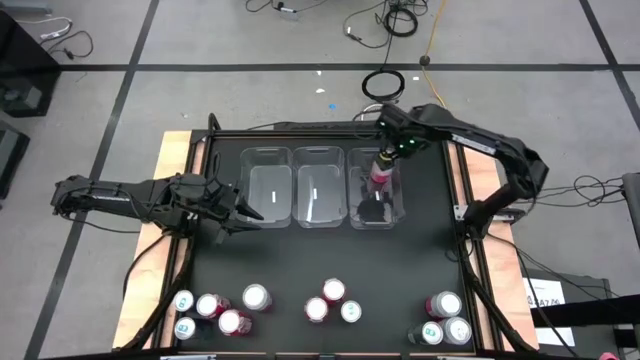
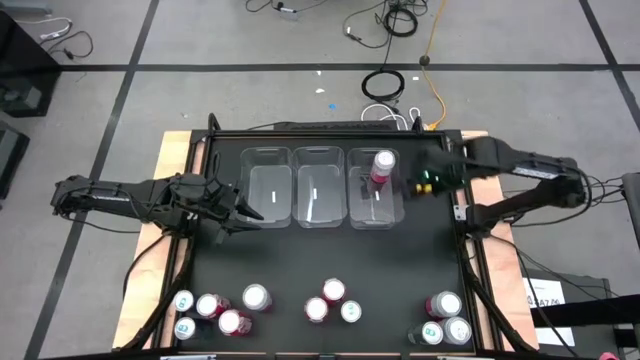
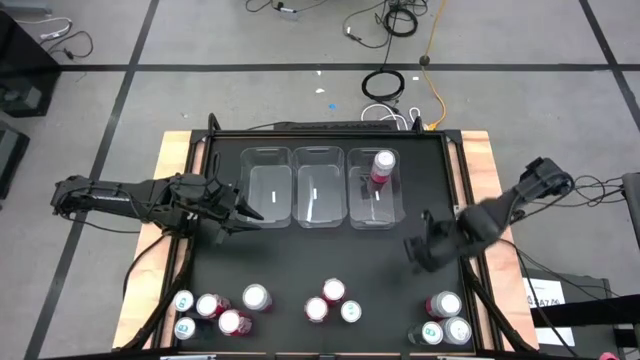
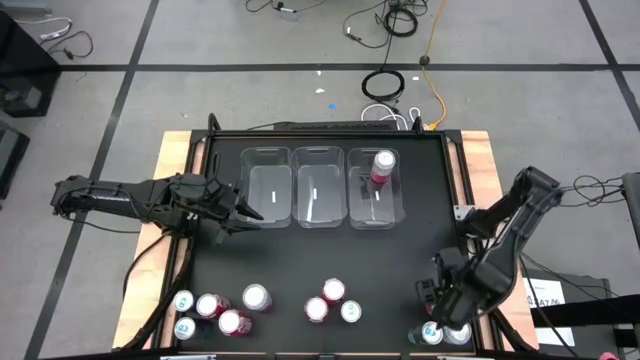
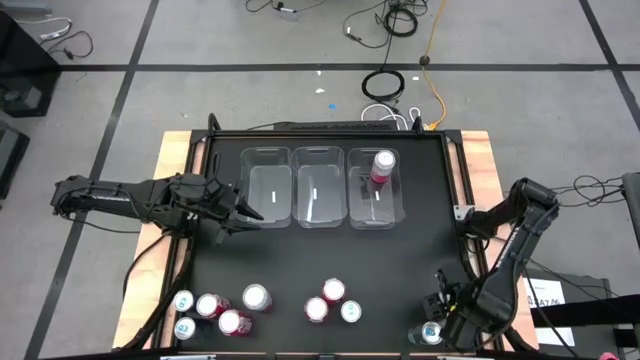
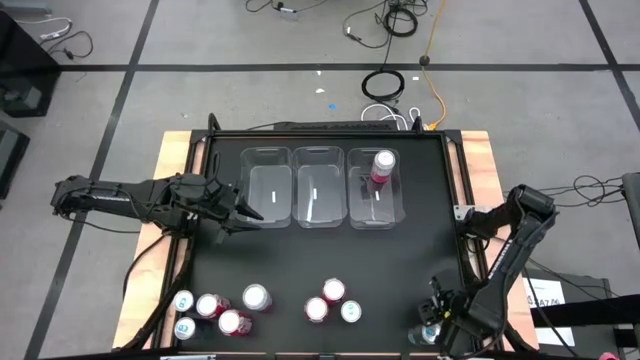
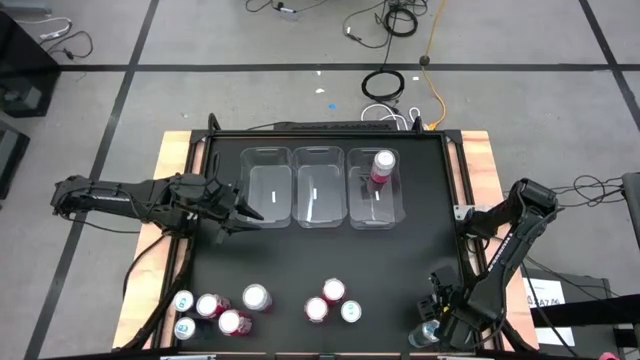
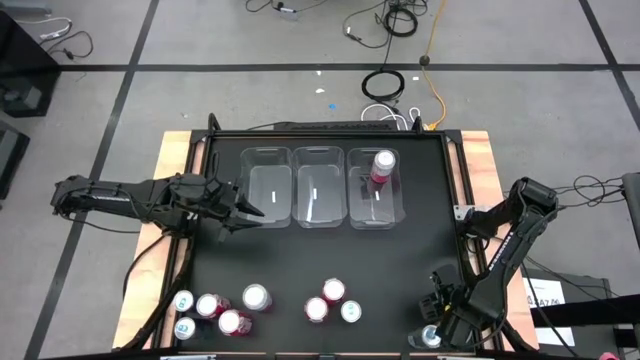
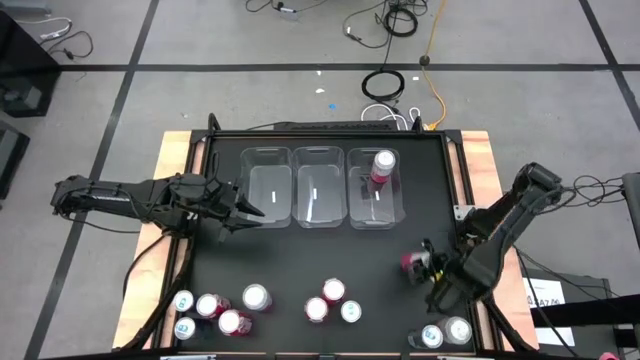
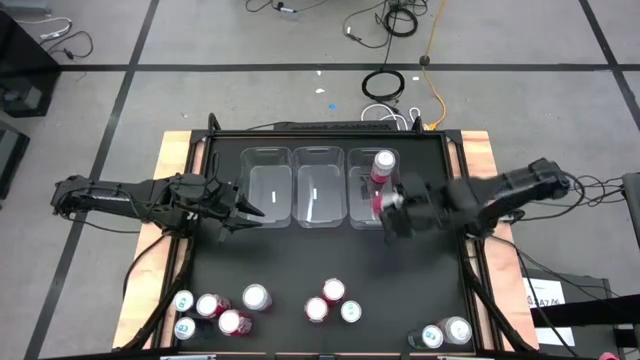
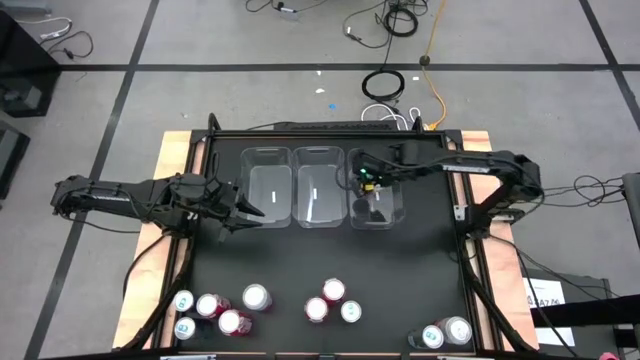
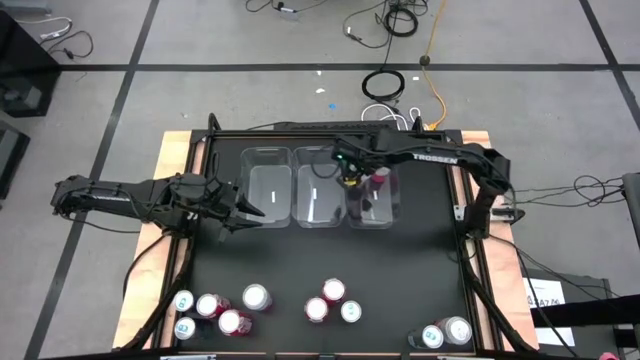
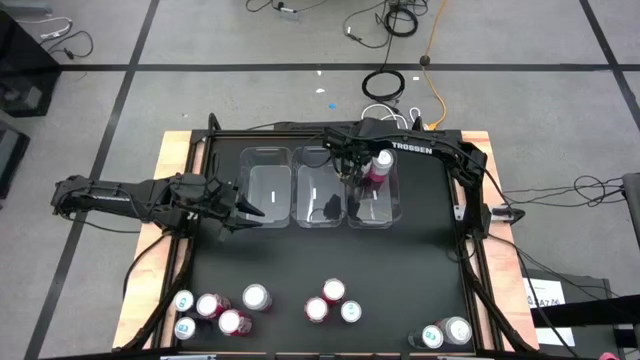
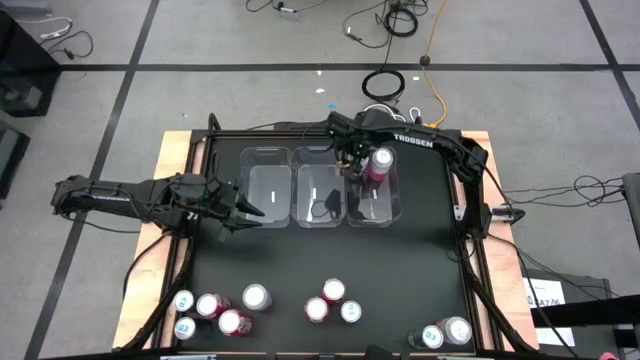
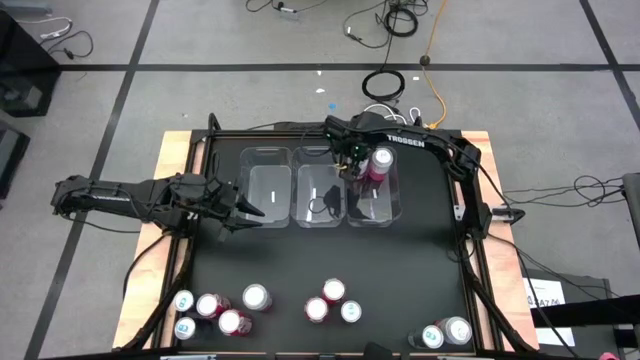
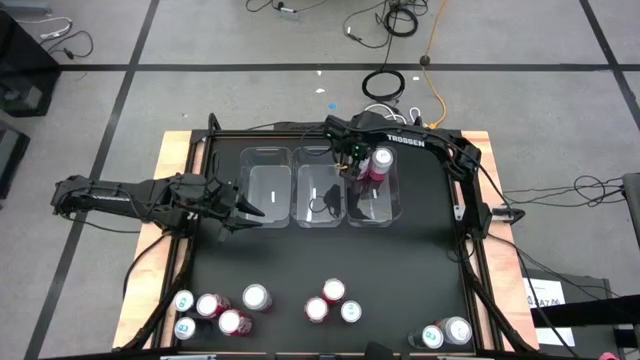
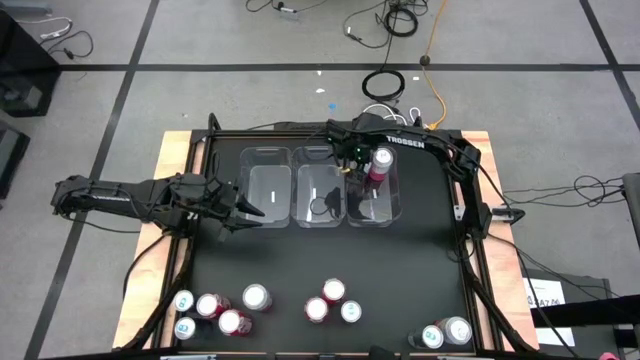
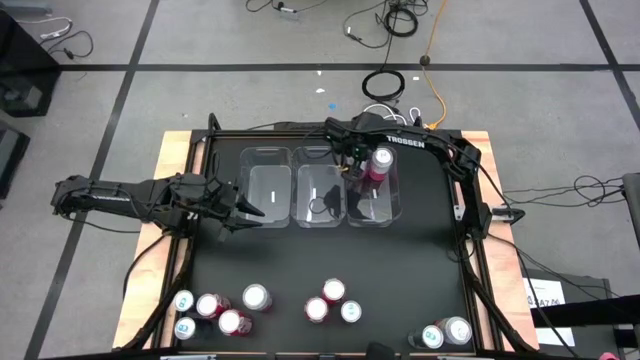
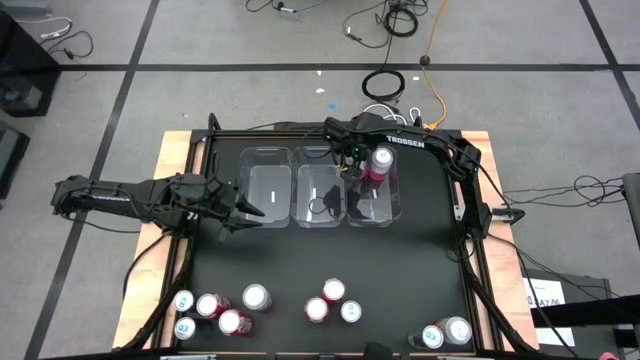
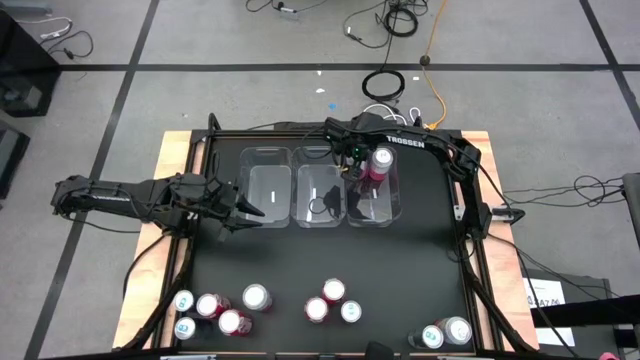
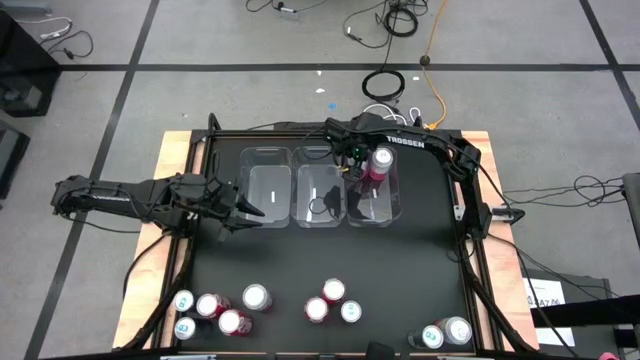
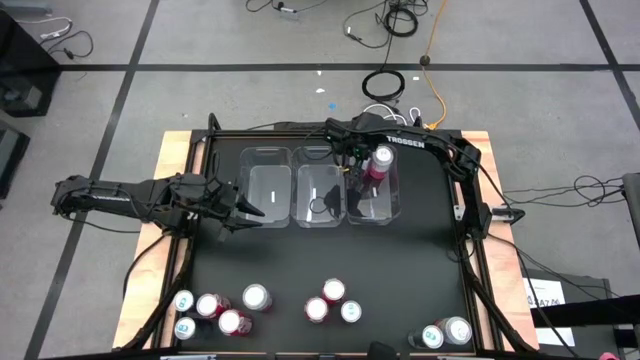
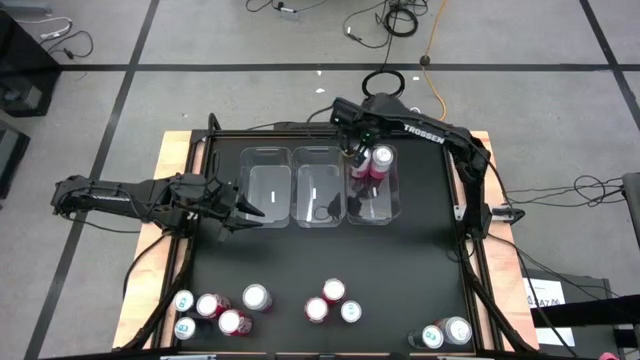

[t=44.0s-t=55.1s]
Task: Sort soda cans
Put the pink-white soda can into the right transparent bin

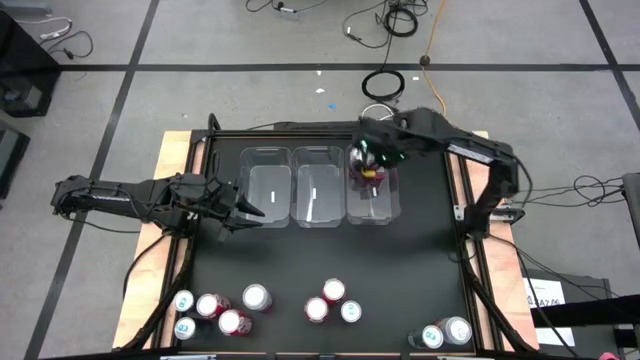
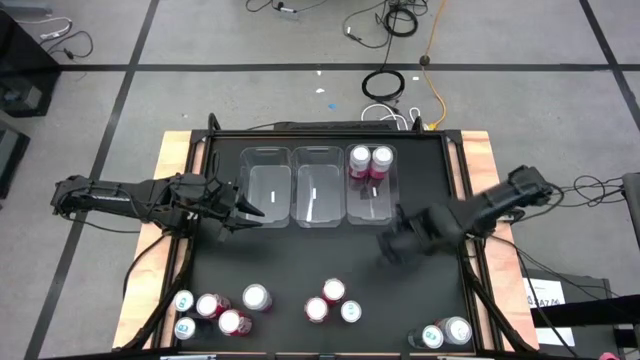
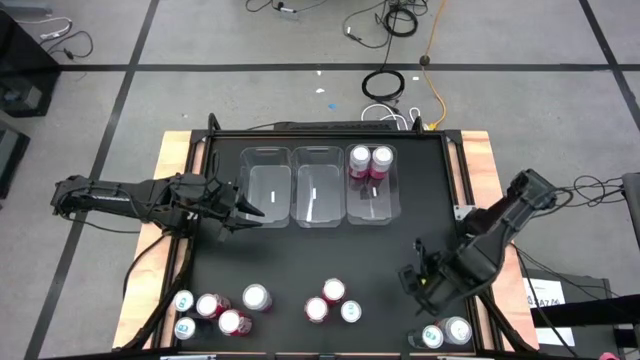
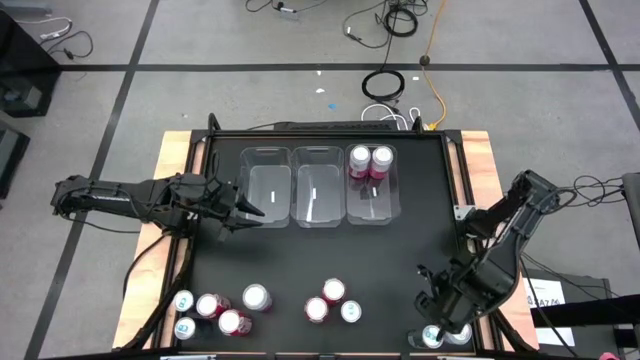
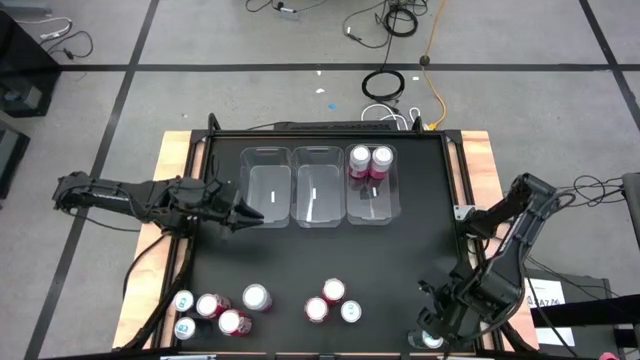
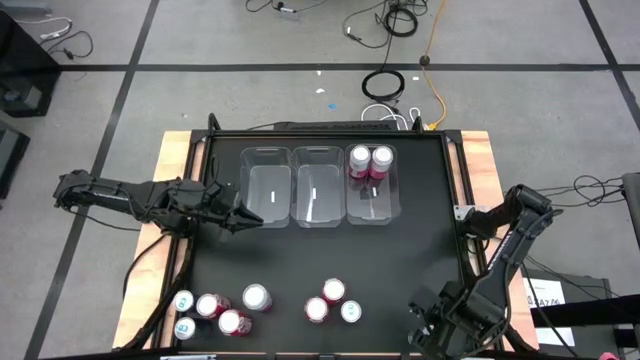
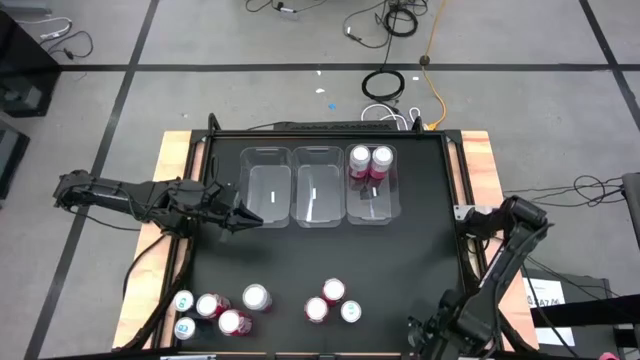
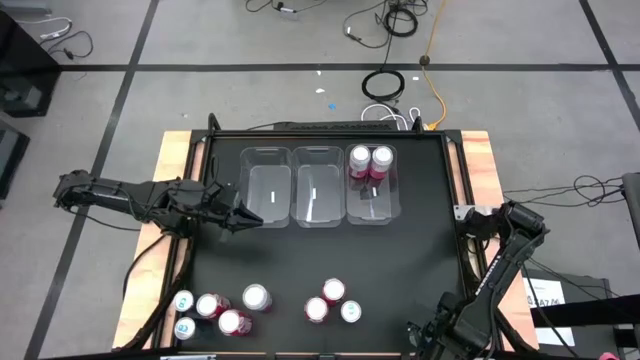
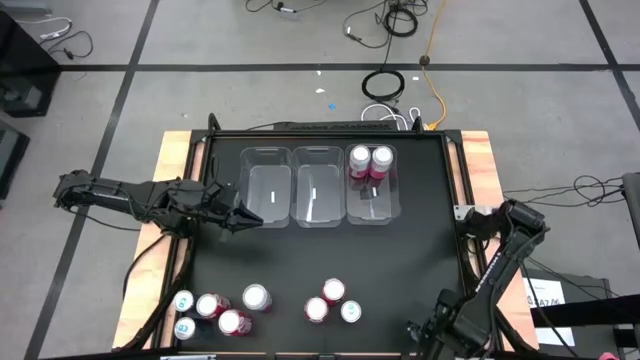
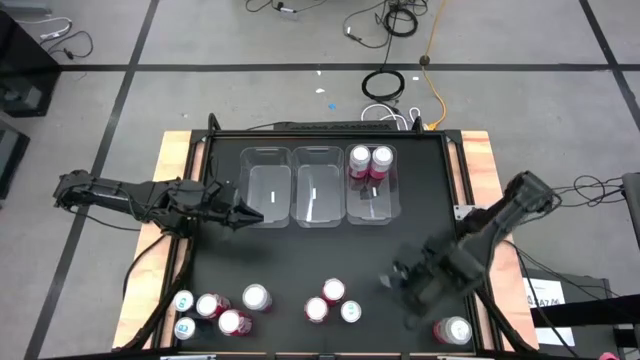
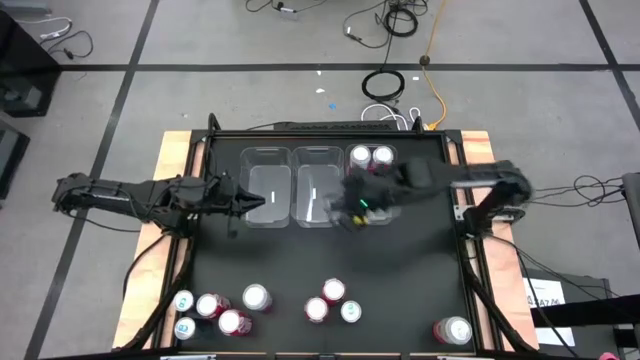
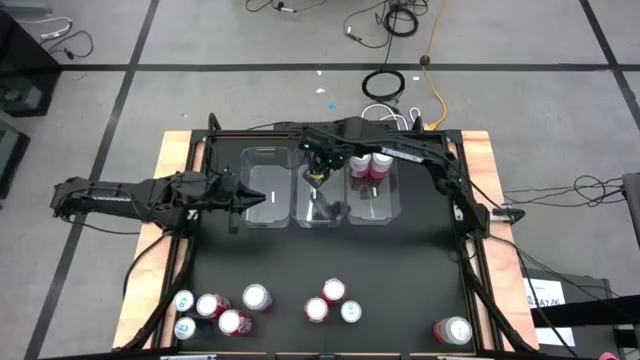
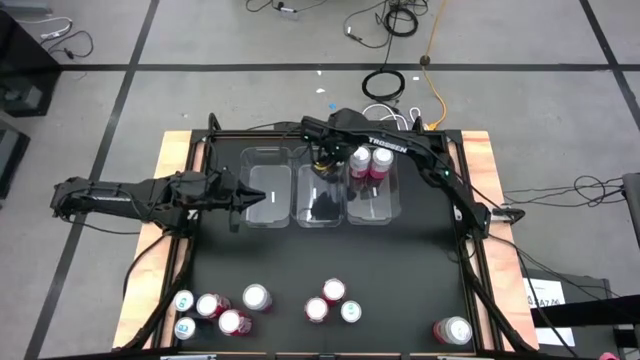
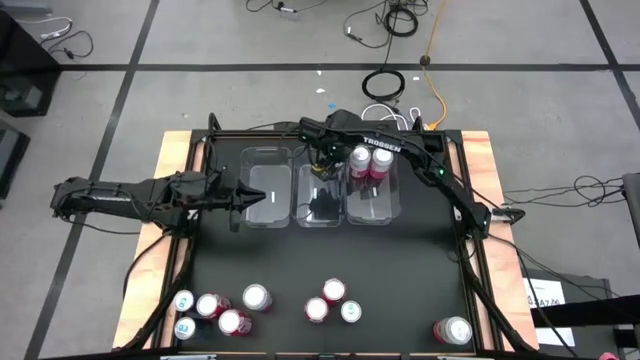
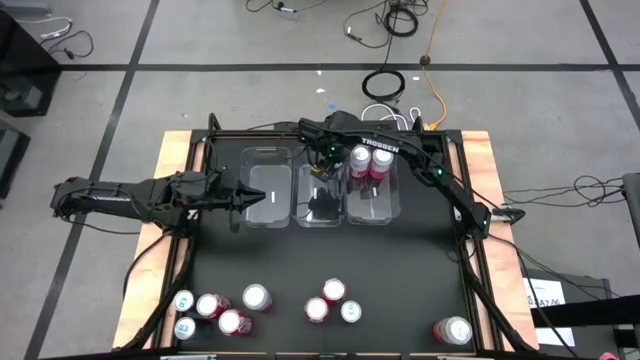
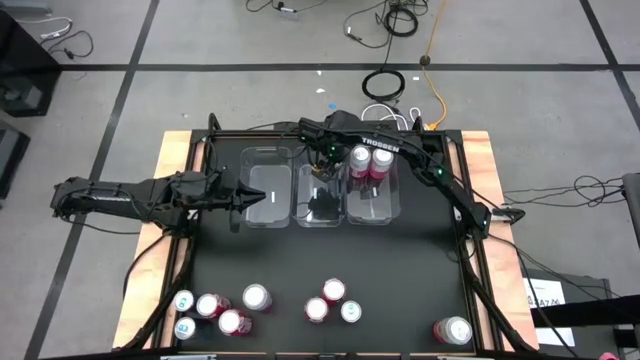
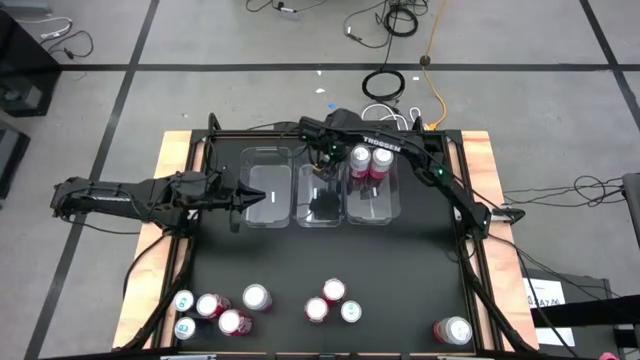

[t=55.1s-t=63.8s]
Put the blue soda can into the center transparent bin
